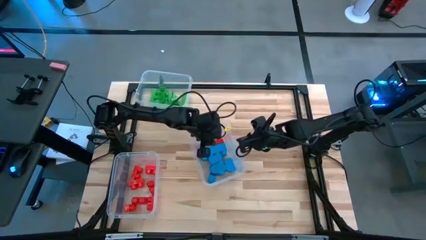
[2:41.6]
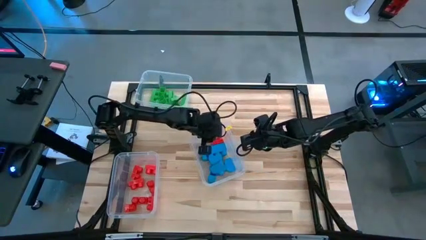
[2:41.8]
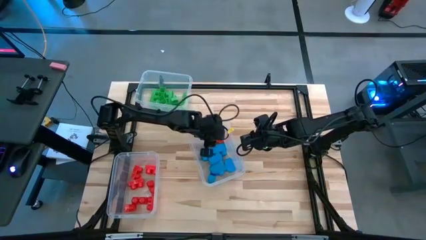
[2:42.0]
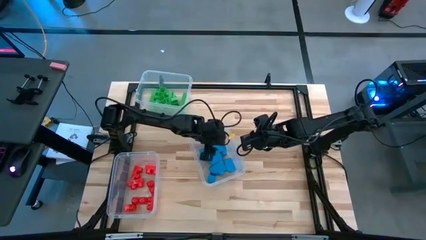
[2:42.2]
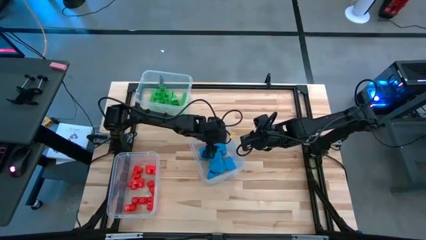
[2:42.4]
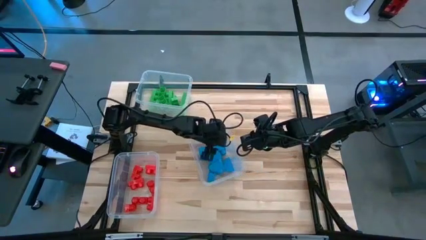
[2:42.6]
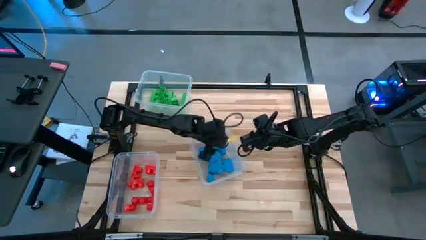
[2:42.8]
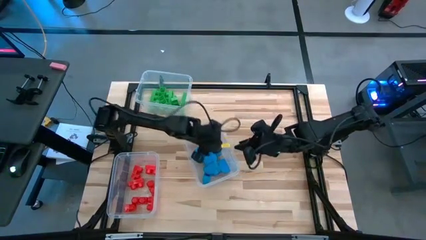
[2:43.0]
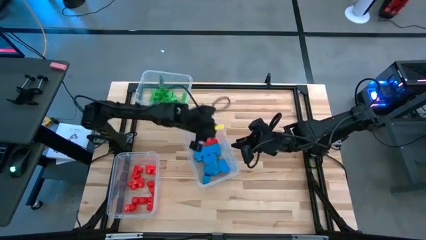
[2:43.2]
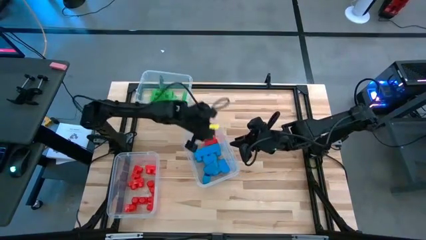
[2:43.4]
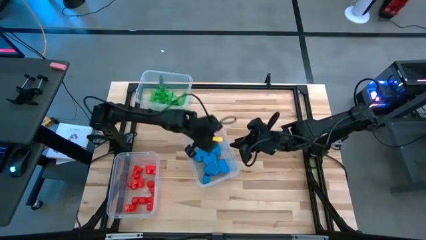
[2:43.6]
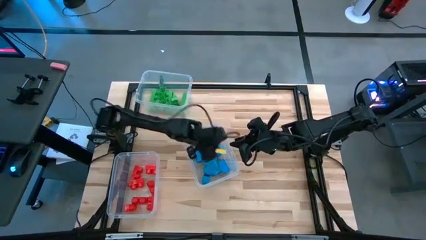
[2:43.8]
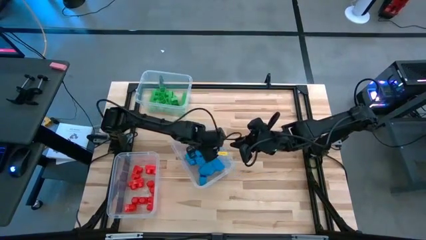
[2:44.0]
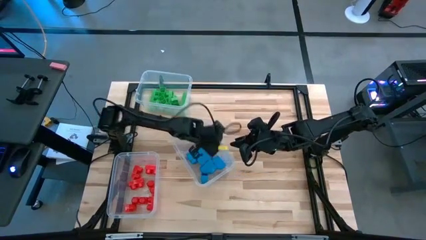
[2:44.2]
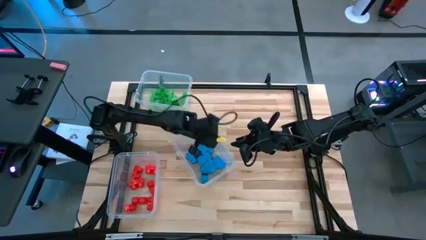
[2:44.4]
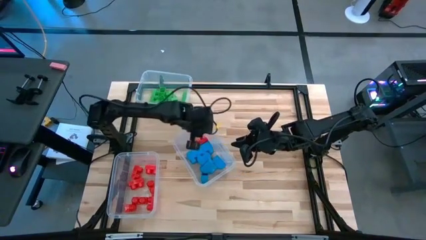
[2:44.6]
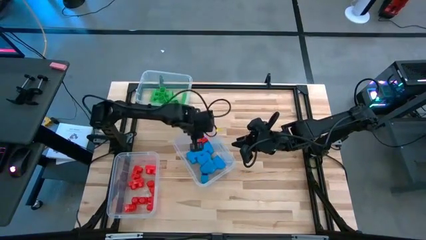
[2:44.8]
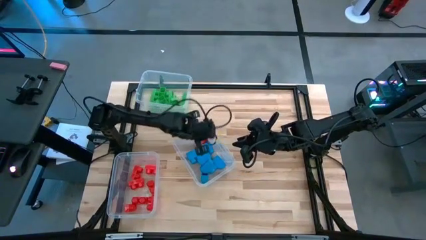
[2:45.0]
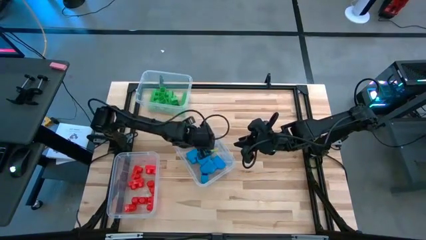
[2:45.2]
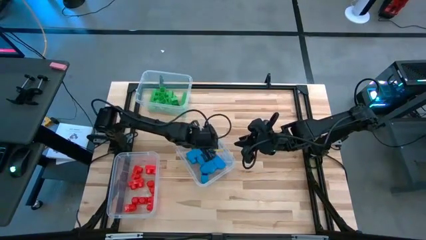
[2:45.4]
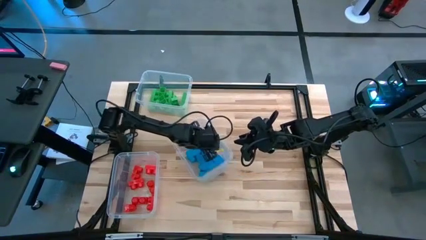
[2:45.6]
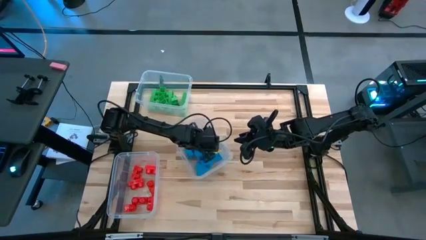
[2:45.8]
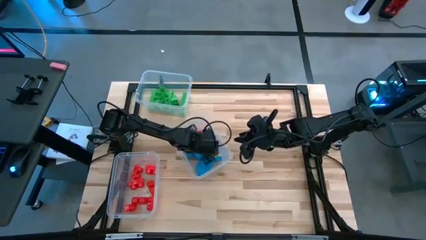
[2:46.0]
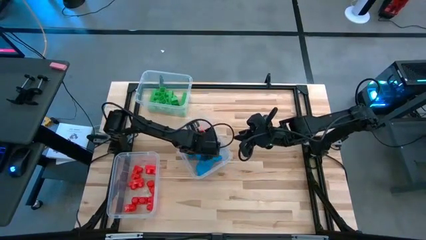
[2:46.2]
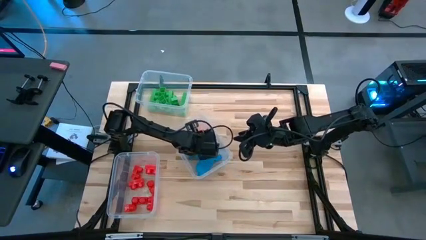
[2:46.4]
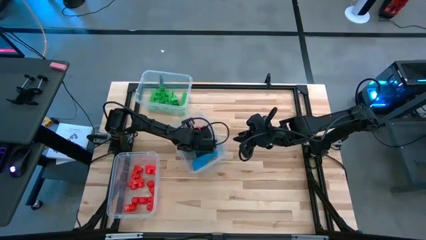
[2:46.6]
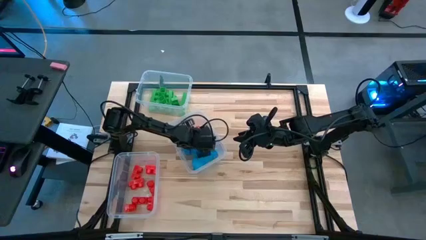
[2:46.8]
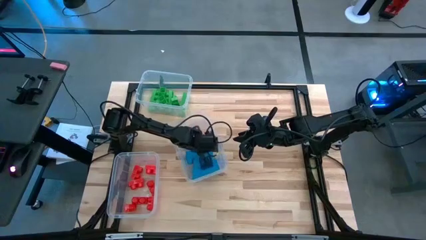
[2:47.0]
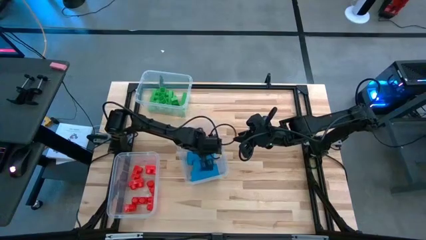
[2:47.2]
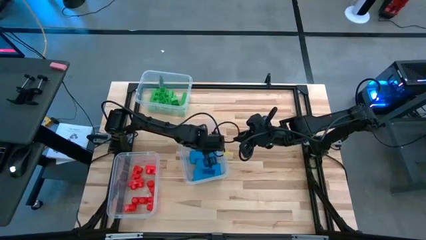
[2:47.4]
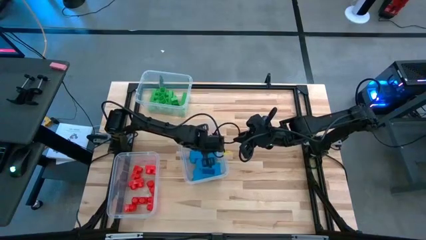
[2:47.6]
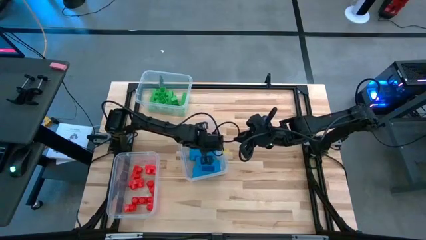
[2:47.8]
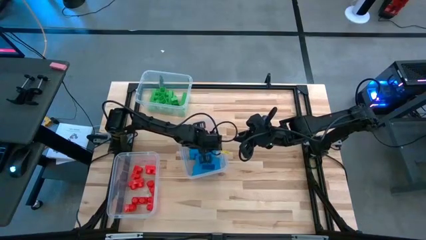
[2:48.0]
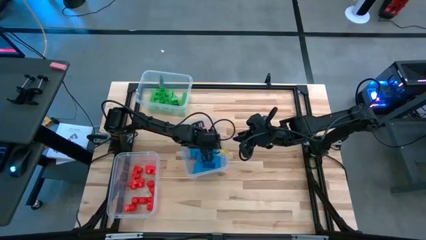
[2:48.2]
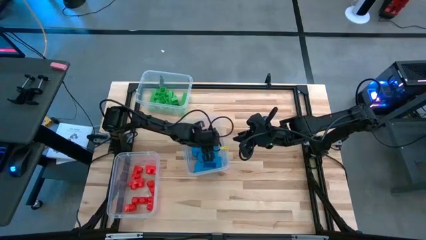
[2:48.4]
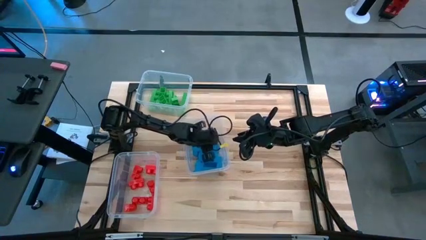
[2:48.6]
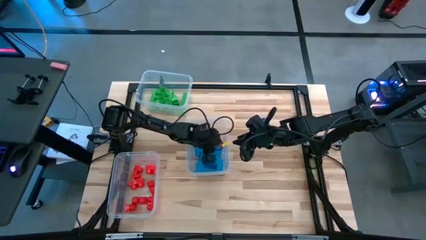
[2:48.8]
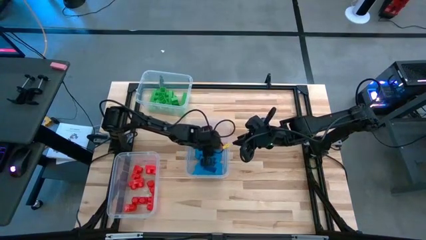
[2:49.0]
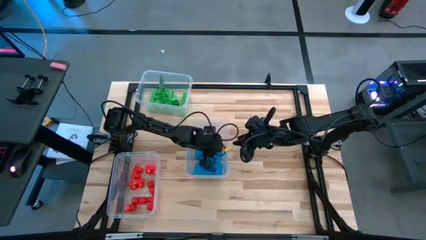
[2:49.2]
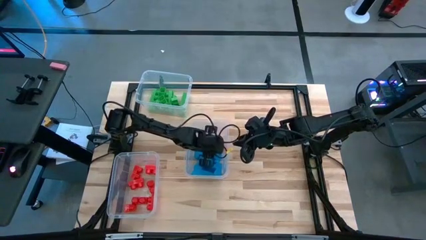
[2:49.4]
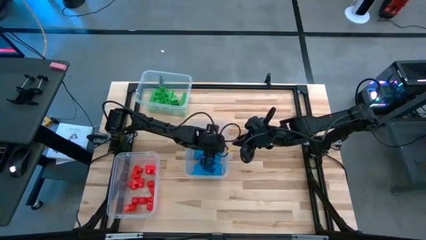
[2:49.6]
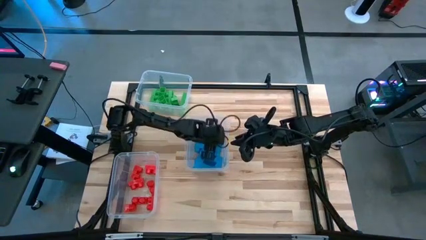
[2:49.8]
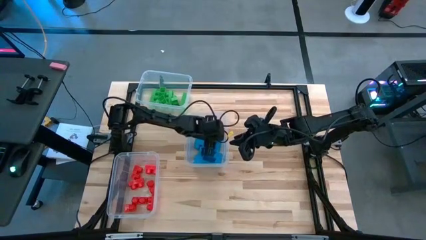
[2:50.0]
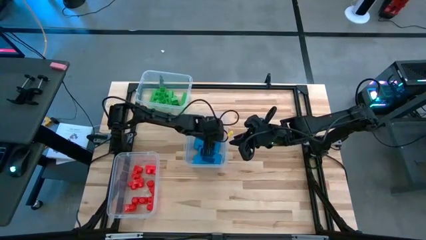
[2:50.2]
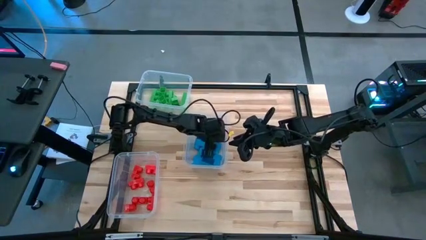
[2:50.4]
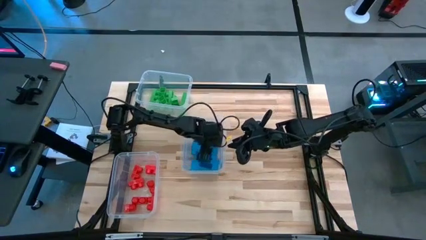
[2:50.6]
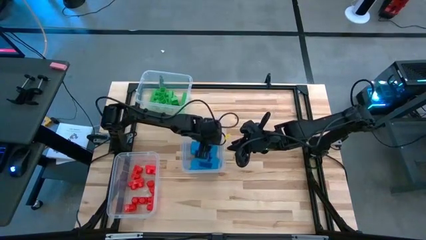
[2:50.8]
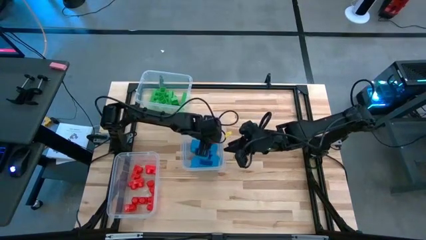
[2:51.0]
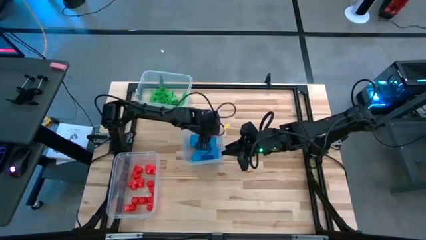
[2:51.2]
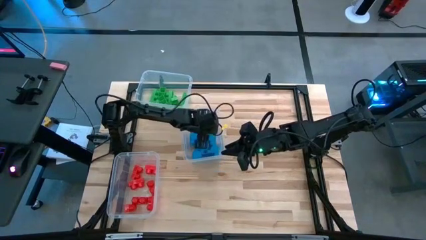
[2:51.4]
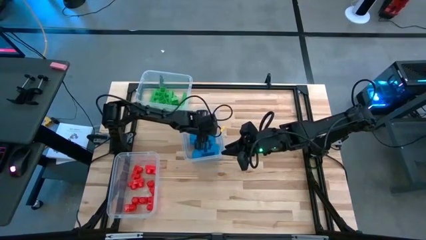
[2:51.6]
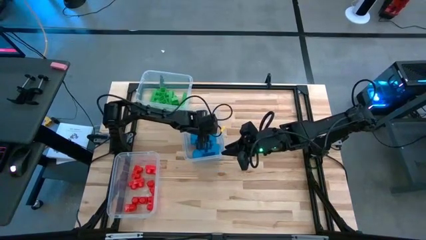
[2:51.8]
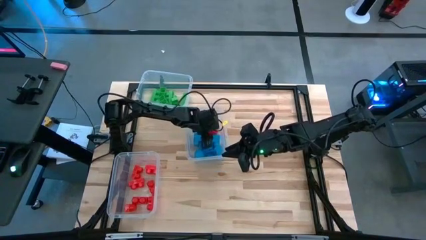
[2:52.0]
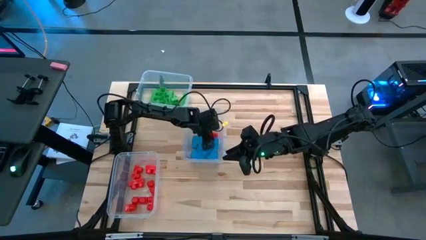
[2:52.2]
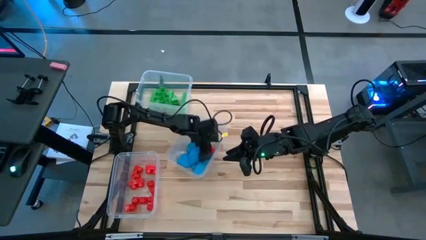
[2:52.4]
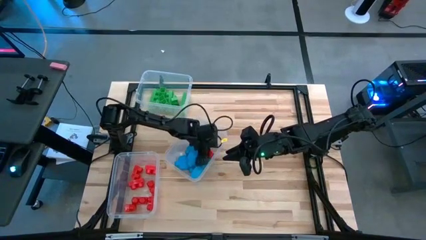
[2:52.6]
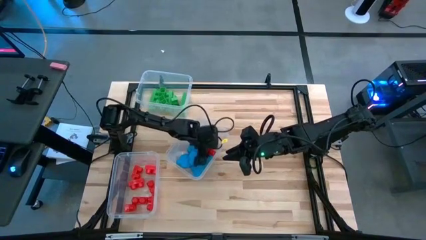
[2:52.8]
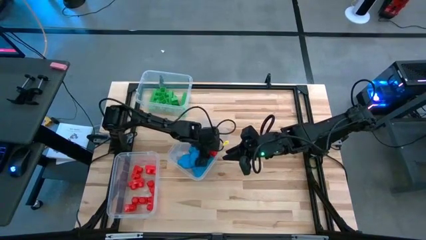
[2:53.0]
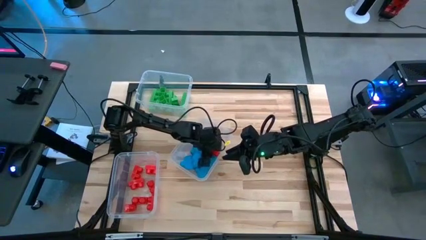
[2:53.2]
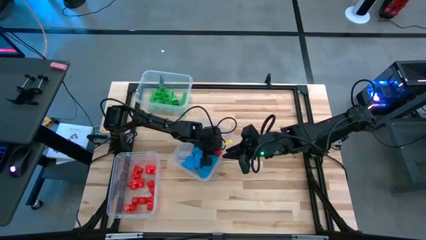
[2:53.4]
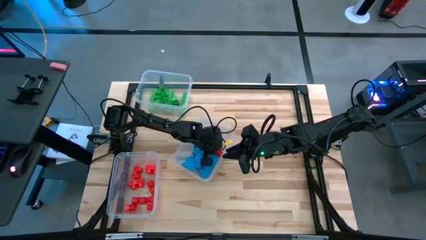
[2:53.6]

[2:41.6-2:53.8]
Task: Sort blocks
Put the red game piece into the bottom transparent bin

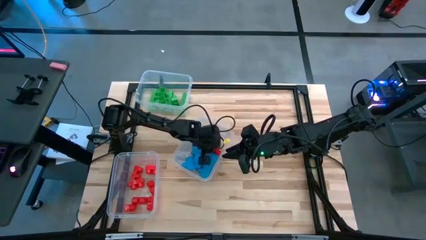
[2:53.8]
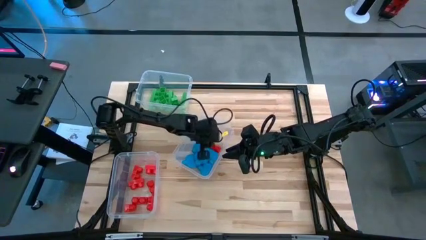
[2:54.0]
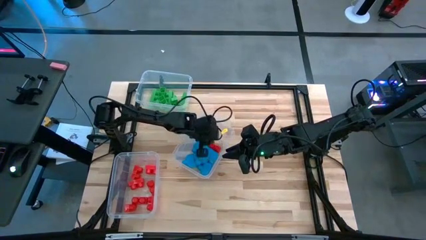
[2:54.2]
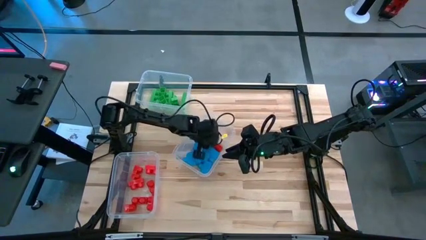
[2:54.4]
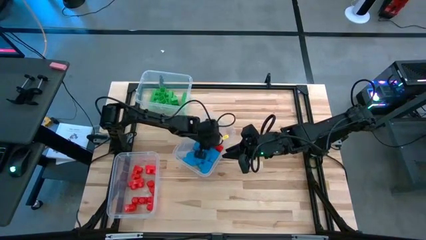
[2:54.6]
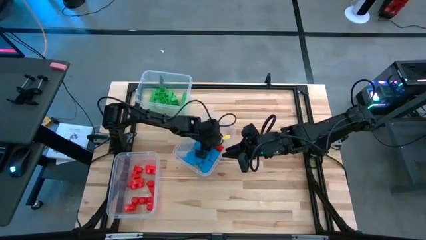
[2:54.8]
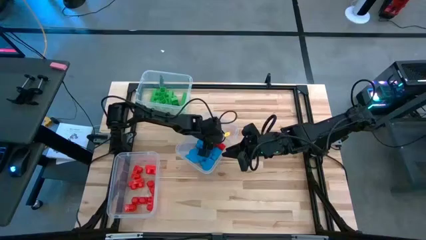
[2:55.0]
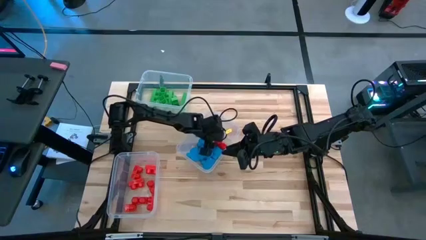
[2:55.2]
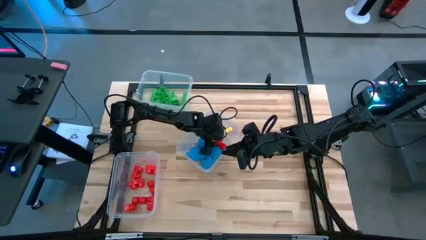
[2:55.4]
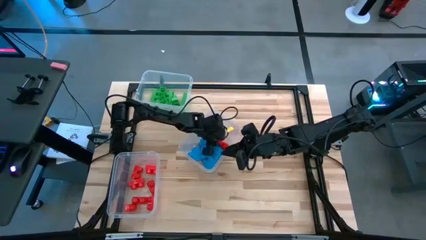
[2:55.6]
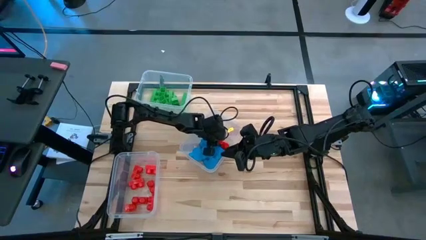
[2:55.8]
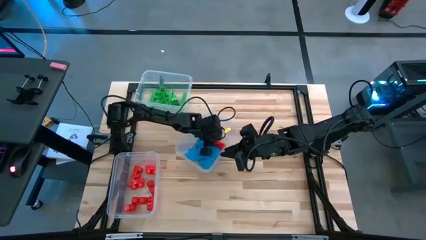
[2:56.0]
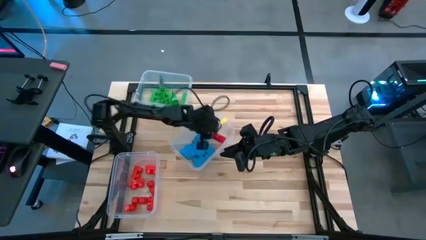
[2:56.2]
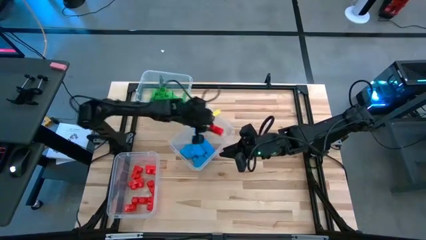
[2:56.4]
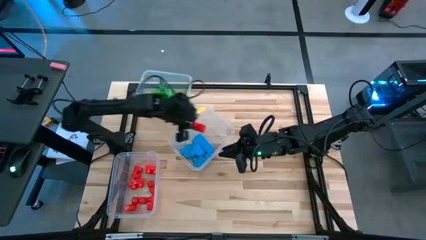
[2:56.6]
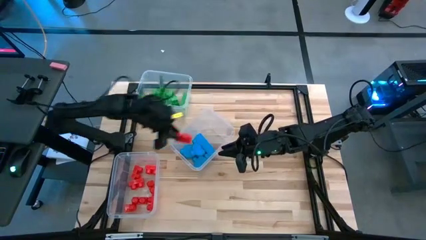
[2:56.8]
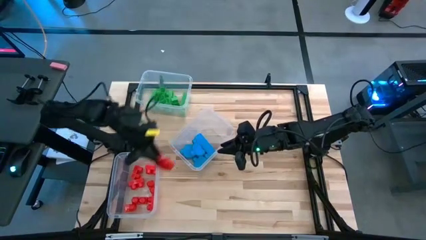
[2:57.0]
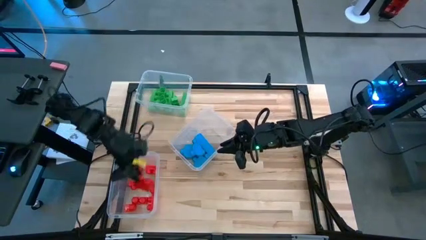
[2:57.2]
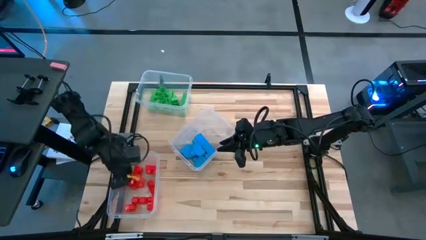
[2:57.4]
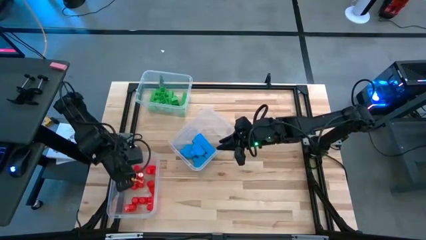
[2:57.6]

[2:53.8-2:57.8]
Put the red game piece into the bottom transparent bin
